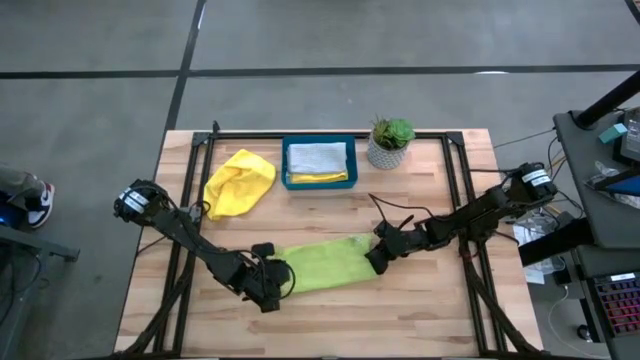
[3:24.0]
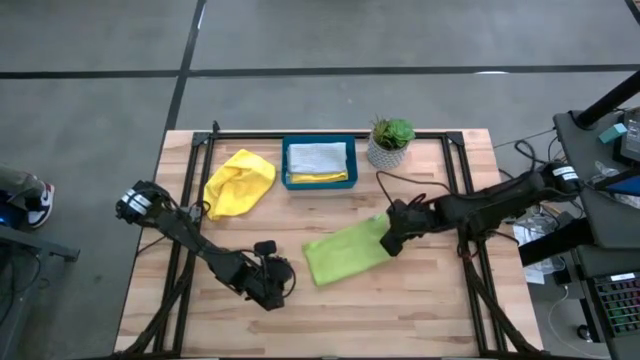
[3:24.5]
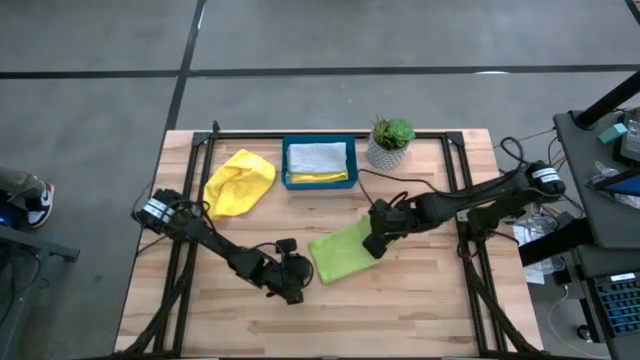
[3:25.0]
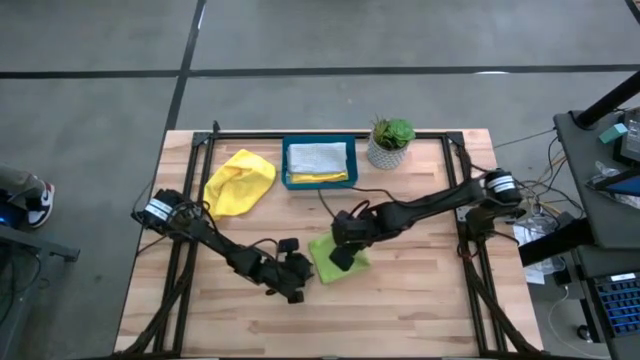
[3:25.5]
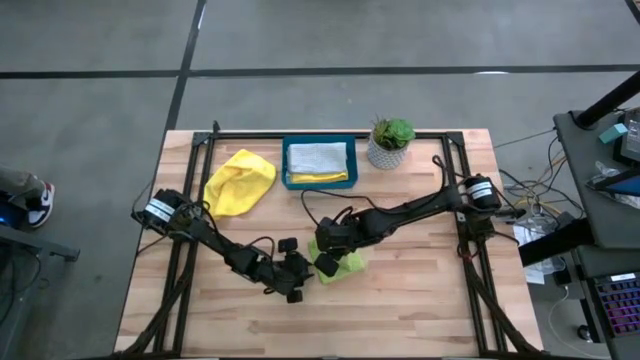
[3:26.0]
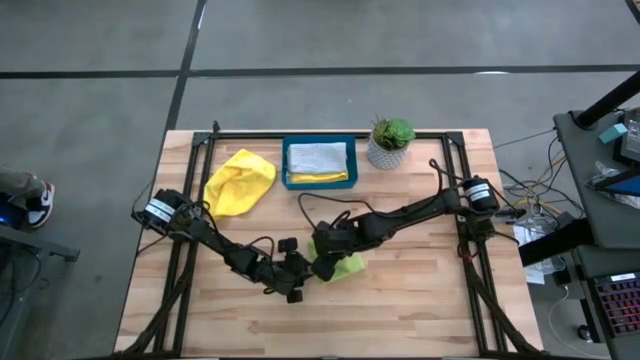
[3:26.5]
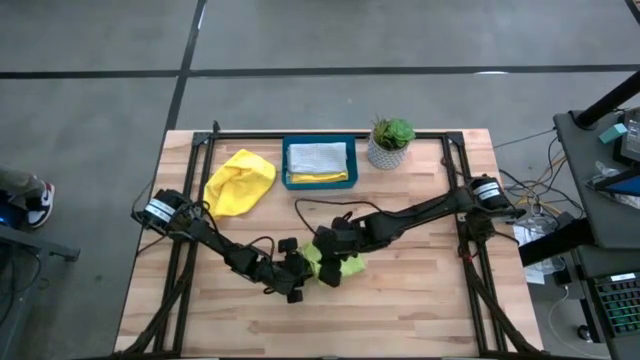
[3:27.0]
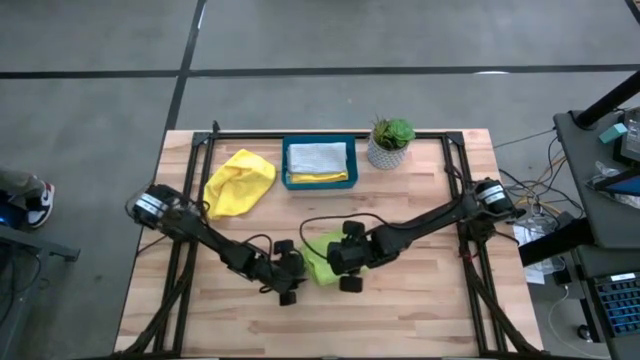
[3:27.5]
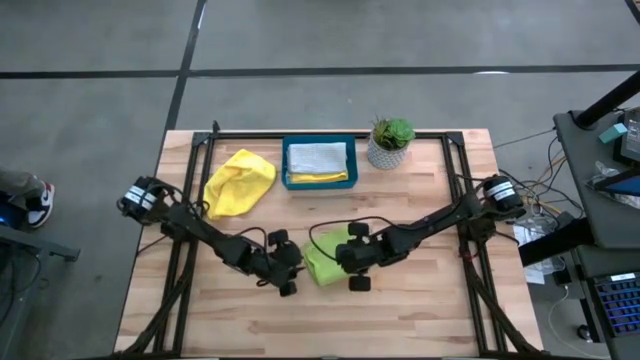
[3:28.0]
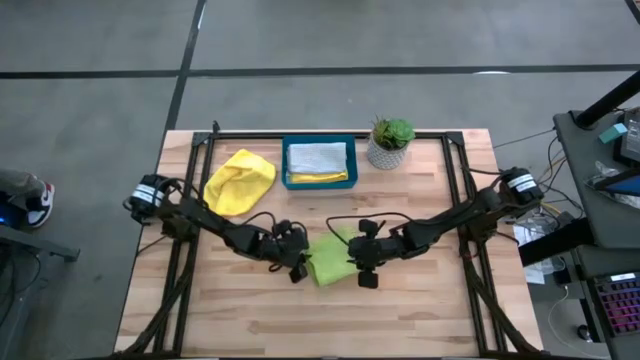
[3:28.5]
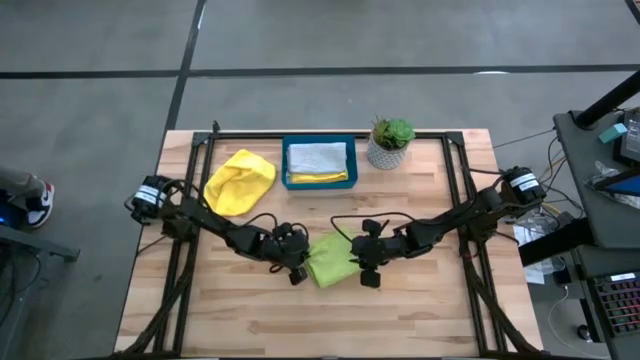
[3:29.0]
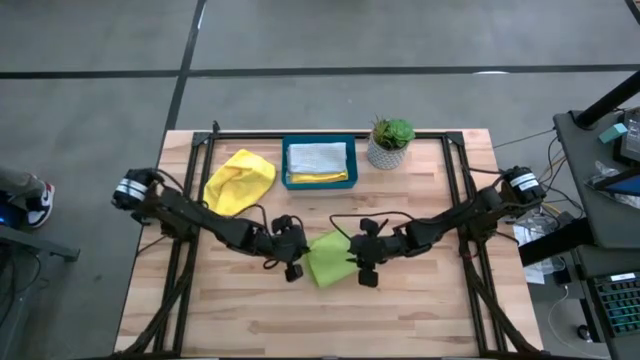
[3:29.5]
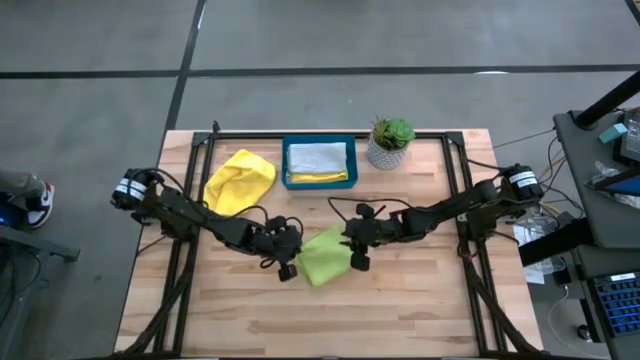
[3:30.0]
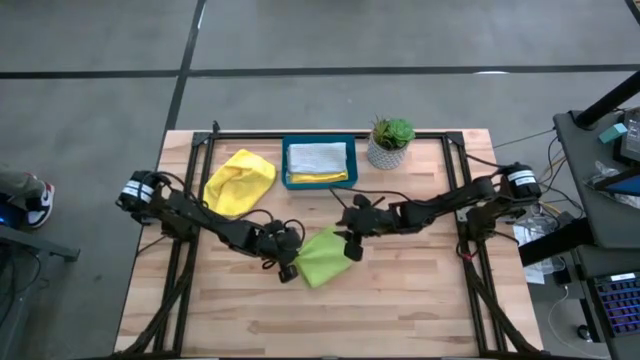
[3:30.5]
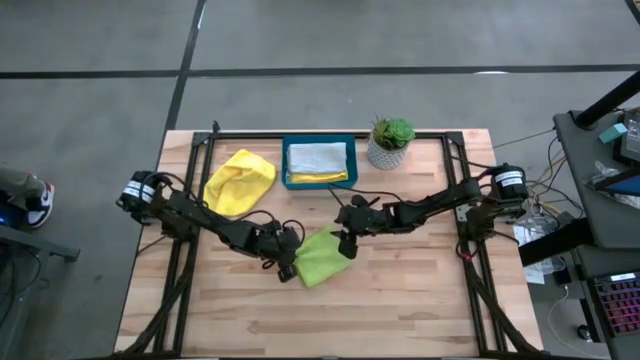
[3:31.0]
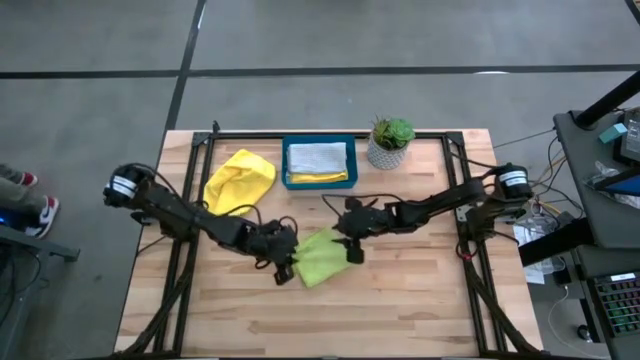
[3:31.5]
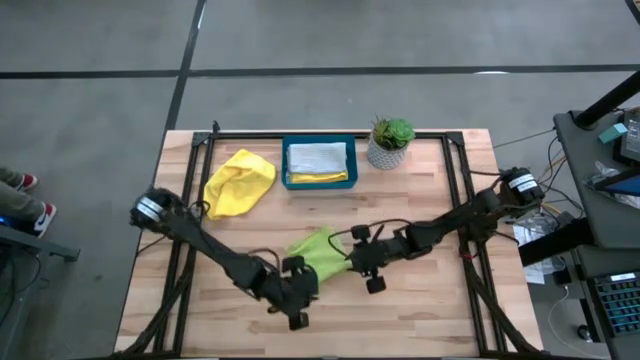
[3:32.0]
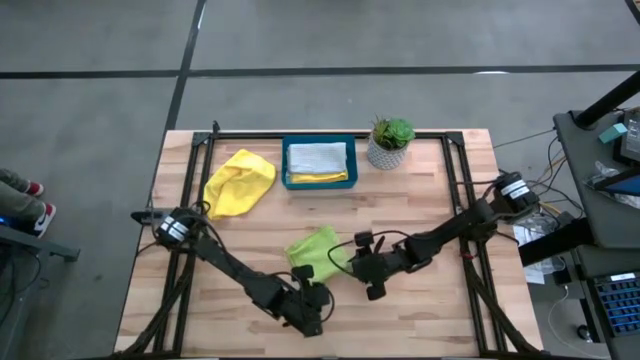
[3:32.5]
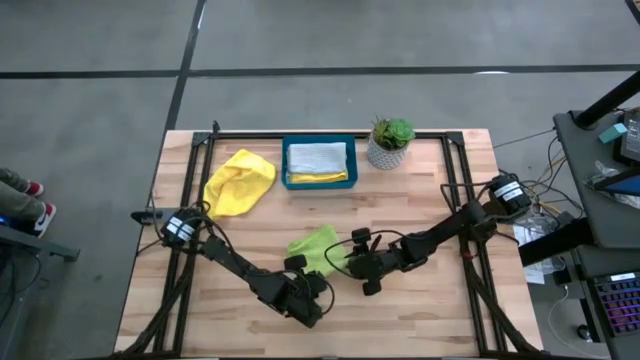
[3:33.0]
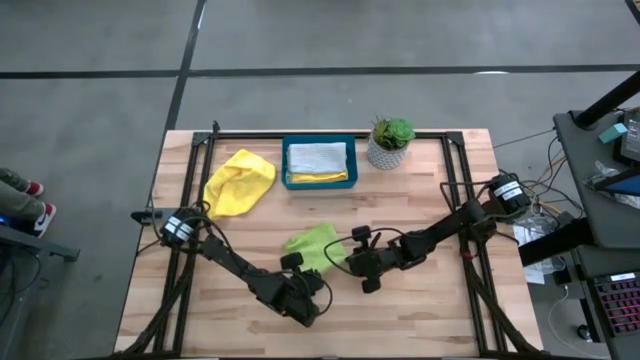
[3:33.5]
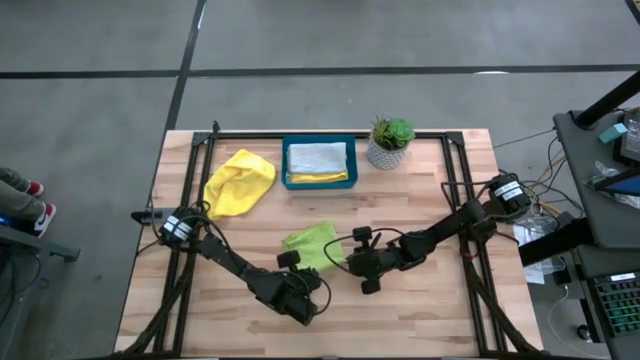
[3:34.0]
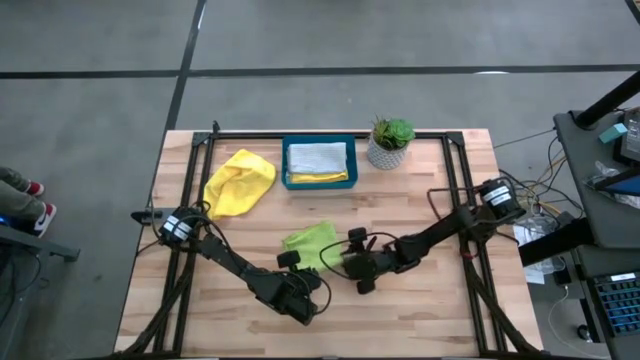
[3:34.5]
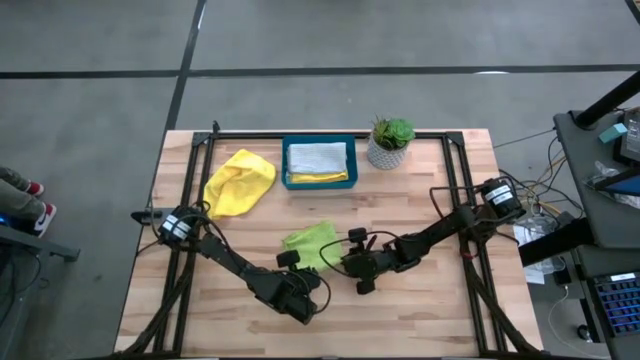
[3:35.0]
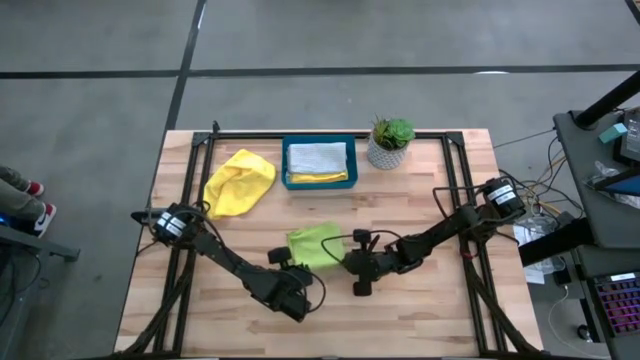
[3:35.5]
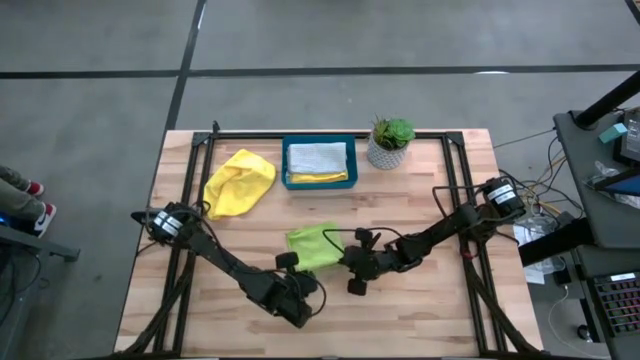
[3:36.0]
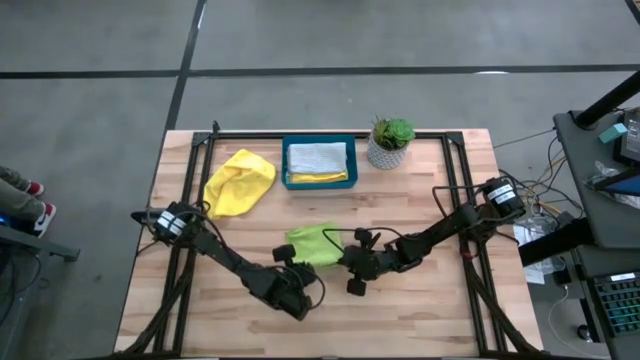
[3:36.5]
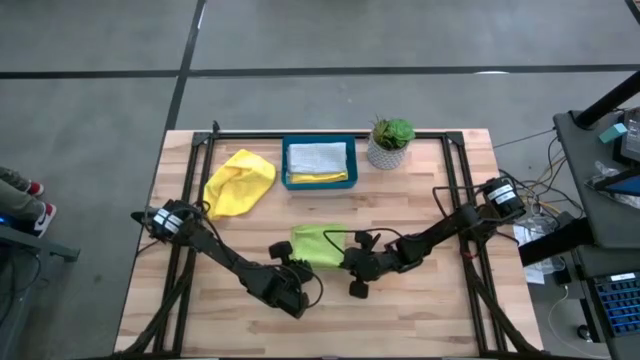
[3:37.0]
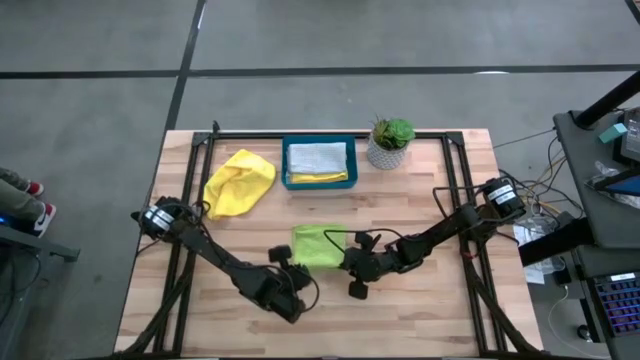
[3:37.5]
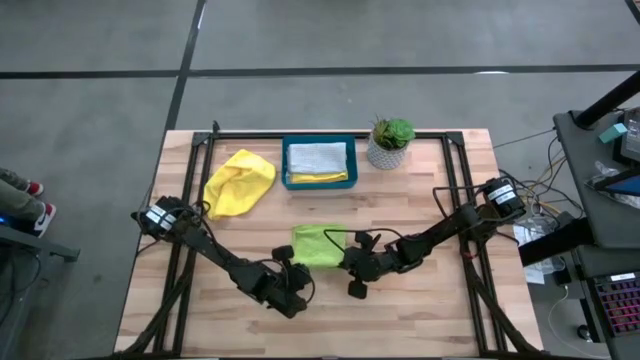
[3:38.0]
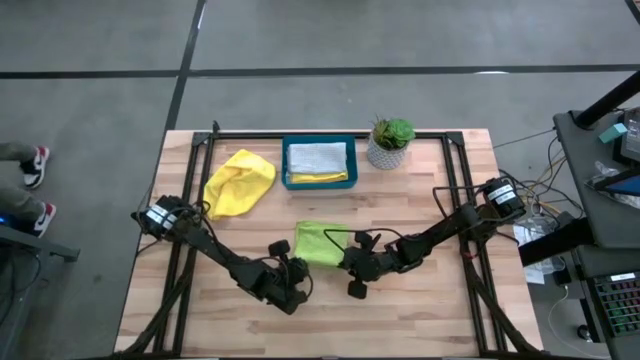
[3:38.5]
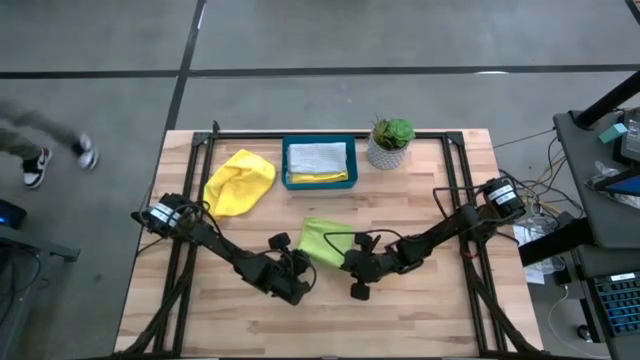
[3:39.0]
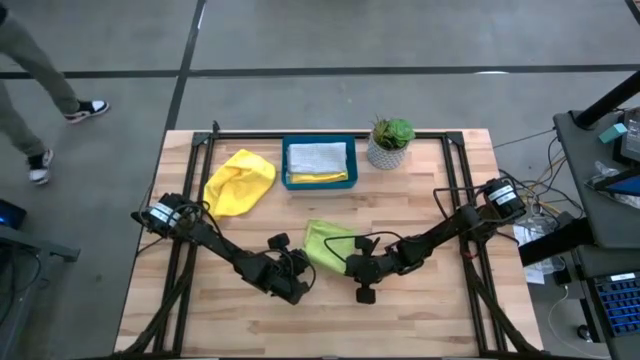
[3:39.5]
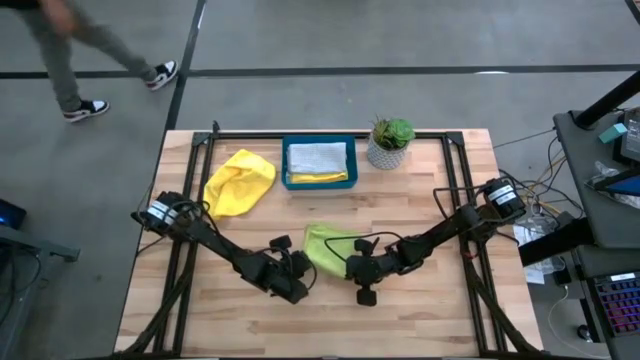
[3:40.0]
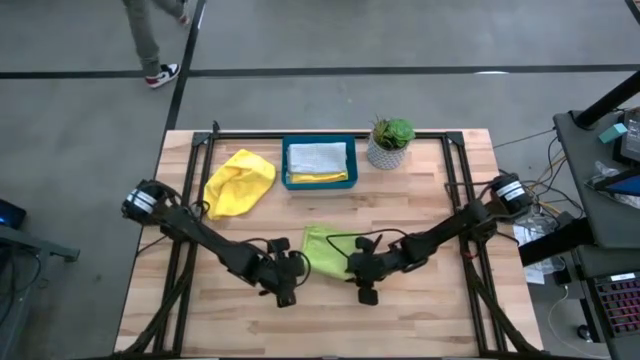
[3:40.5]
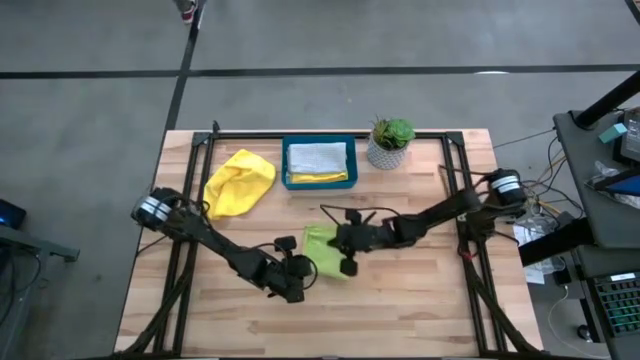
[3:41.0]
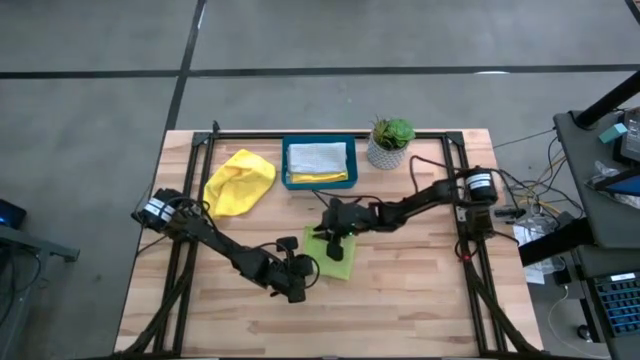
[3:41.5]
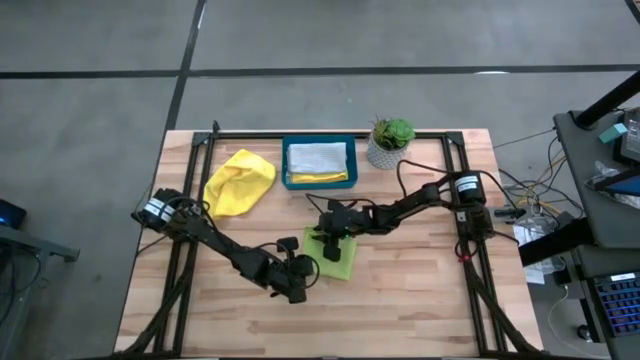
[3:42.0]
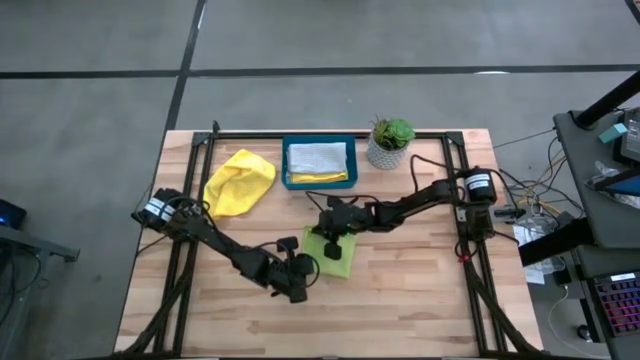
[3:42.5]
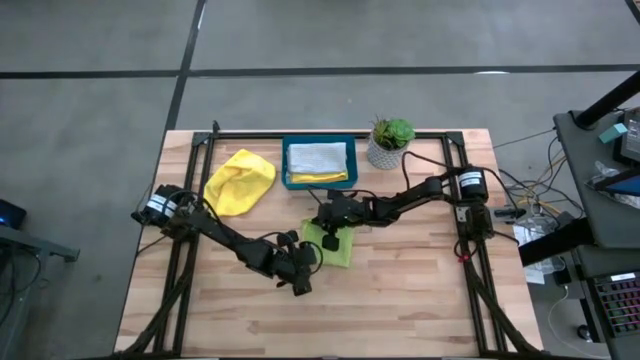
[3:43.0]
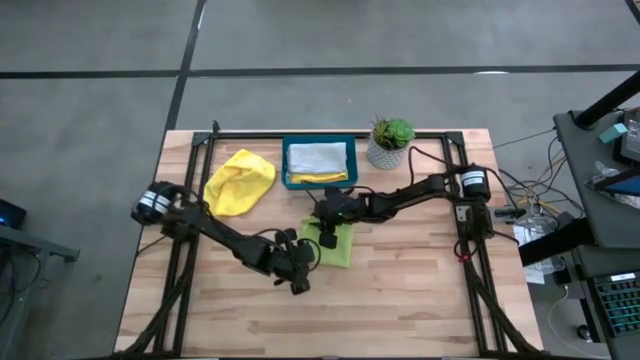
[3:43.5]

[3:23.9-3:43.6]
Task: Fold microfiber towels
Fold the green microfiber cloth

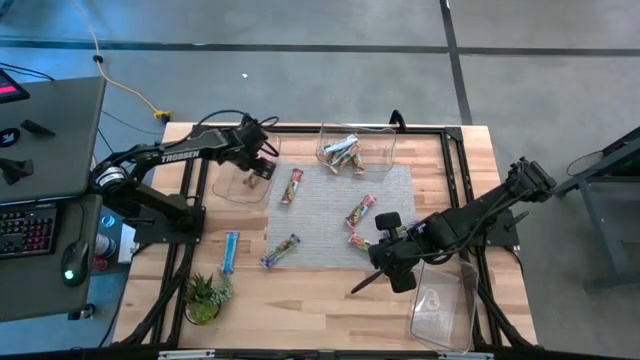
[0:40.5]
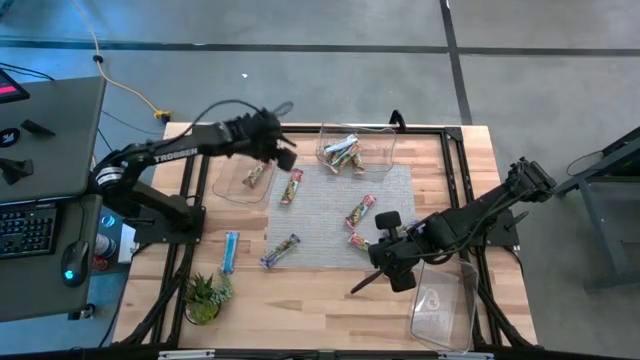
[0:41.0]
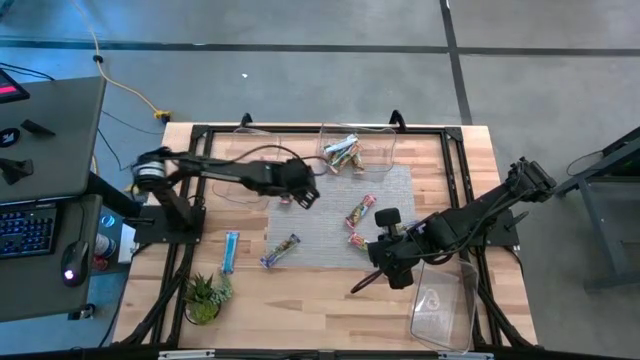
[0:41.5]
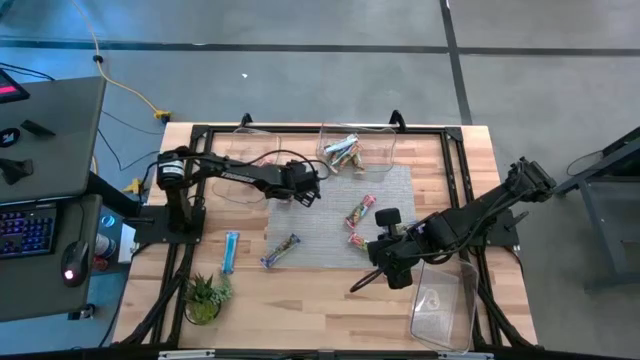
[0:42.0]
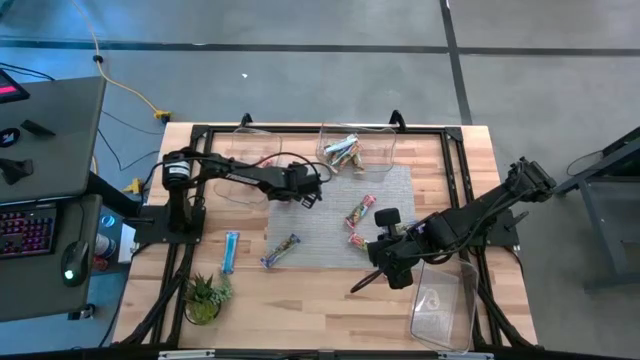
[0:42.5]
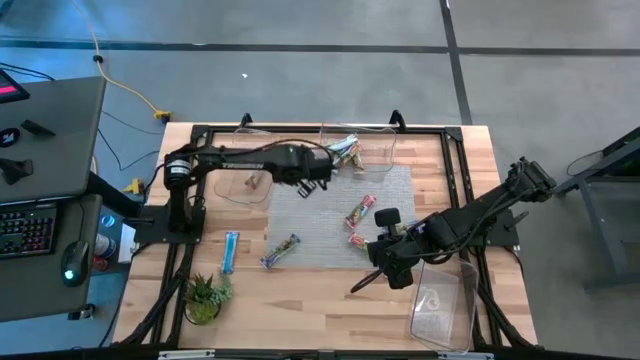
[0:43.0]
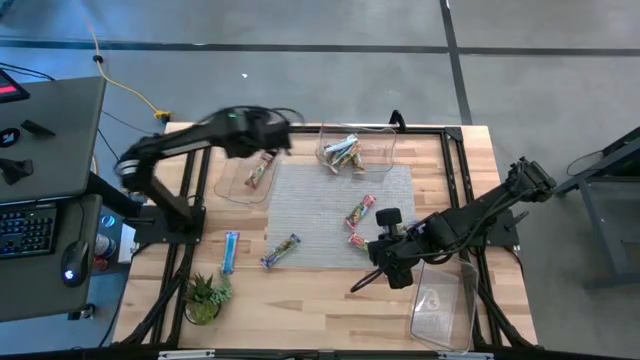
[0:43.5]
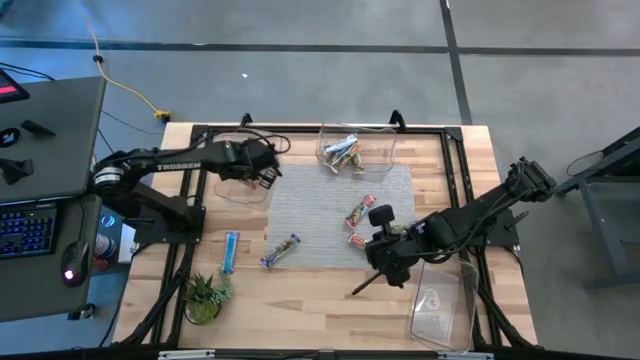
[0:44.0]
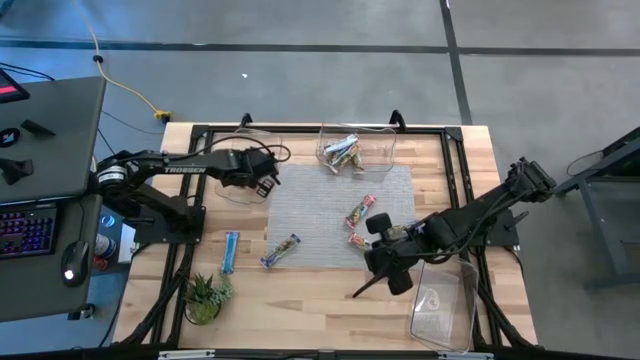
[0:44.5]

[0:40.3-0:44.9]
Task: Pick and place Granola Bars by type
Put the red granola bar into the top left transparent bin
